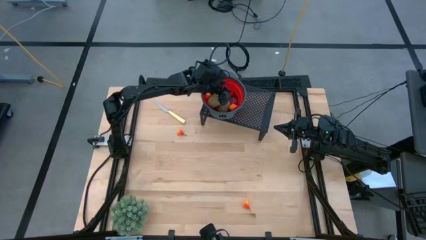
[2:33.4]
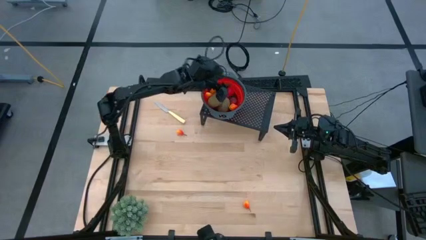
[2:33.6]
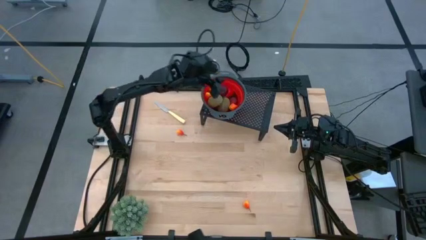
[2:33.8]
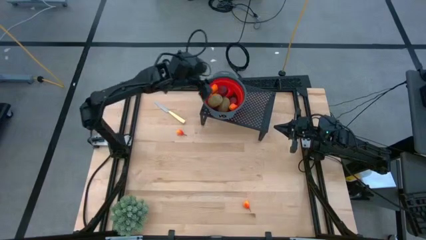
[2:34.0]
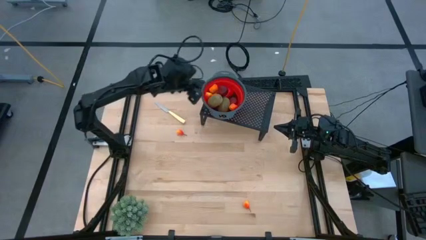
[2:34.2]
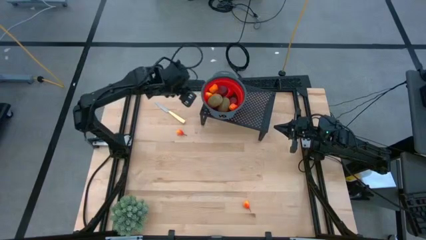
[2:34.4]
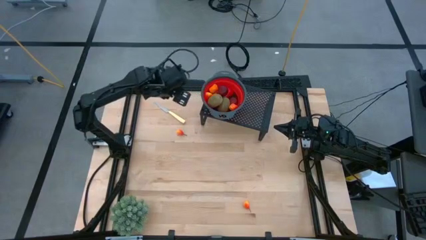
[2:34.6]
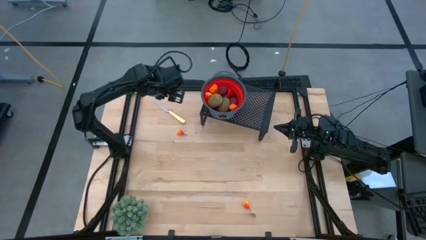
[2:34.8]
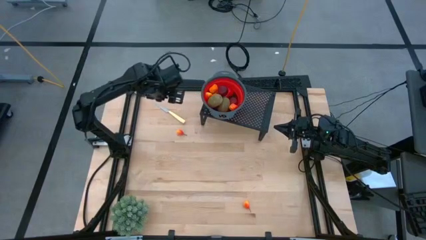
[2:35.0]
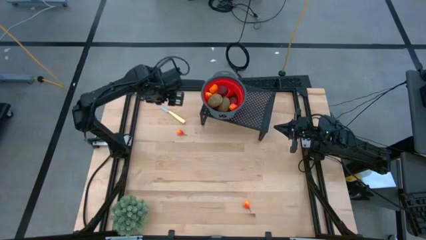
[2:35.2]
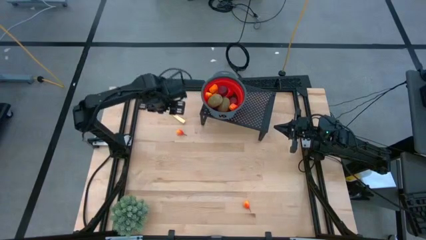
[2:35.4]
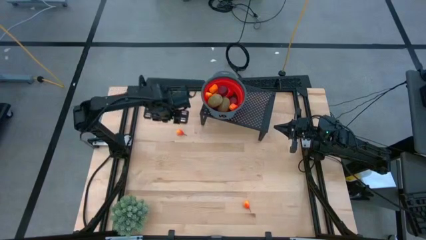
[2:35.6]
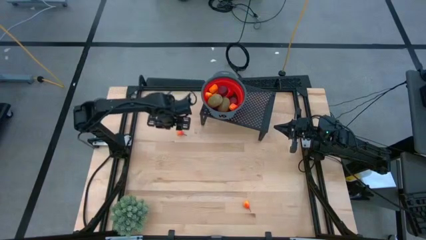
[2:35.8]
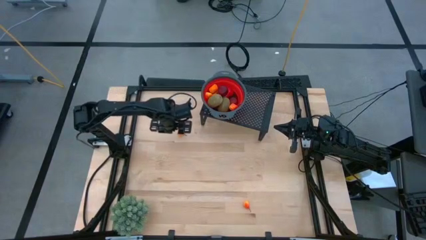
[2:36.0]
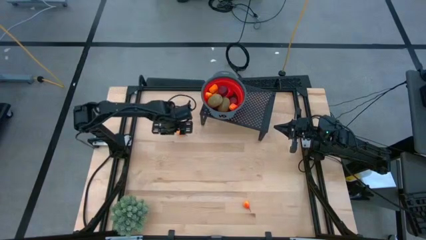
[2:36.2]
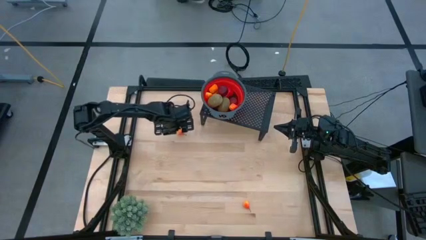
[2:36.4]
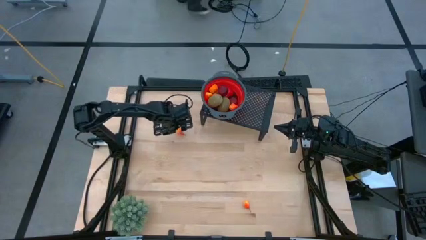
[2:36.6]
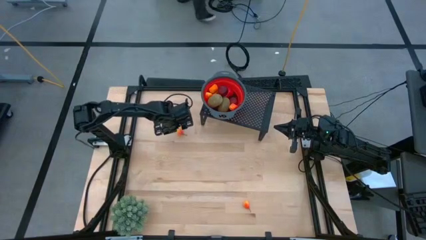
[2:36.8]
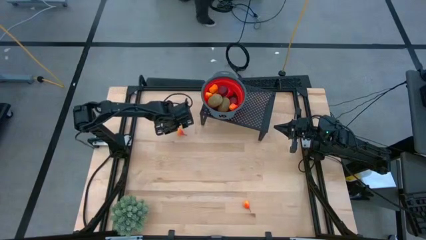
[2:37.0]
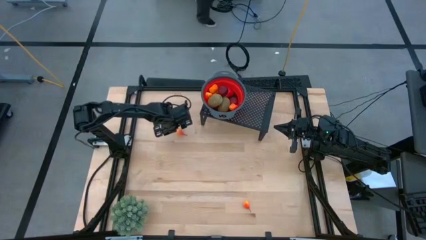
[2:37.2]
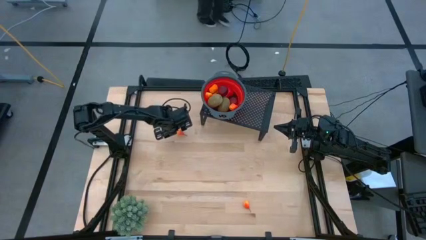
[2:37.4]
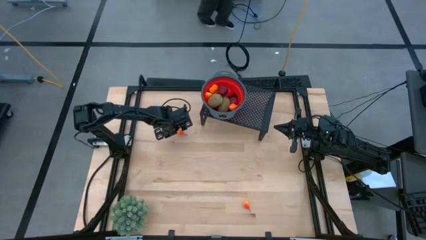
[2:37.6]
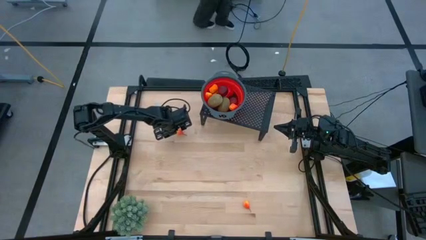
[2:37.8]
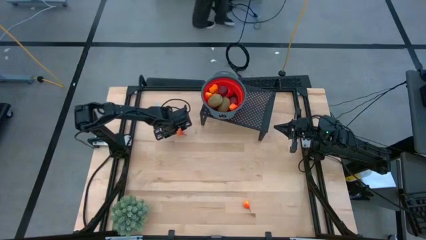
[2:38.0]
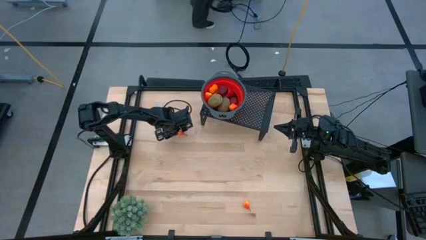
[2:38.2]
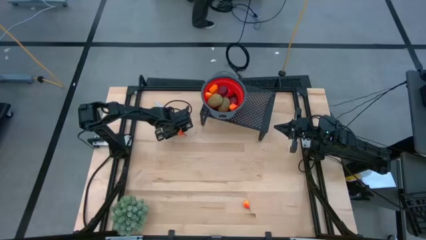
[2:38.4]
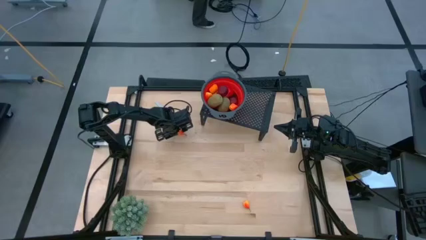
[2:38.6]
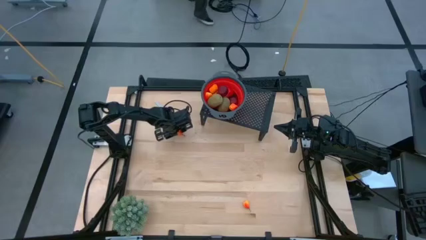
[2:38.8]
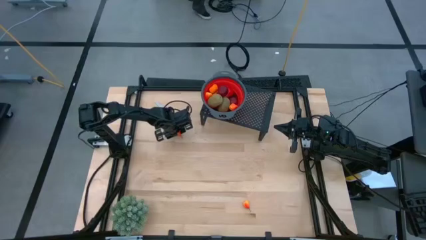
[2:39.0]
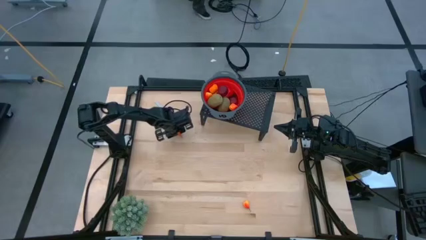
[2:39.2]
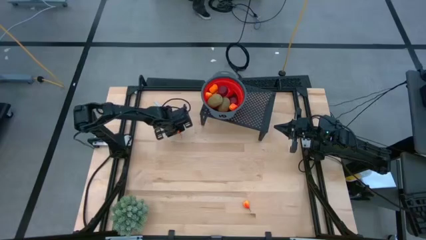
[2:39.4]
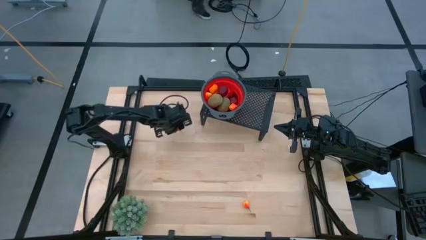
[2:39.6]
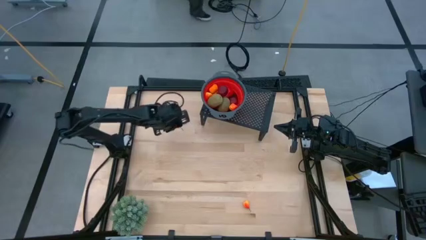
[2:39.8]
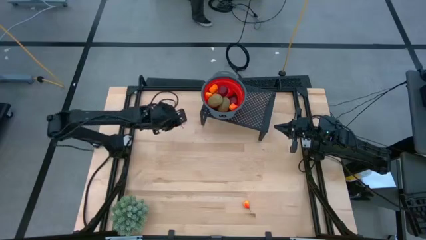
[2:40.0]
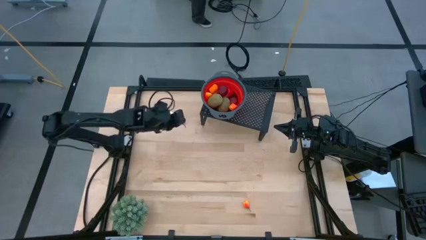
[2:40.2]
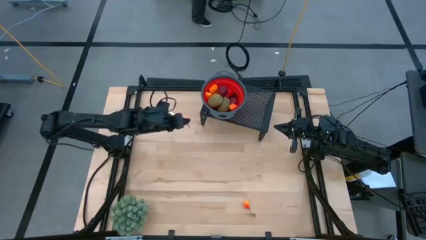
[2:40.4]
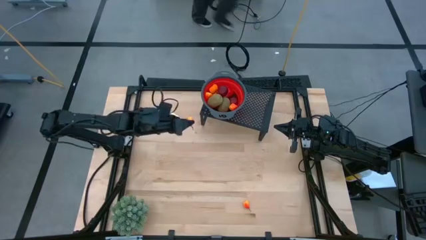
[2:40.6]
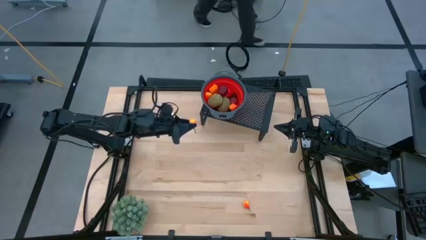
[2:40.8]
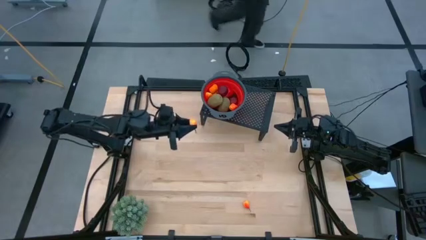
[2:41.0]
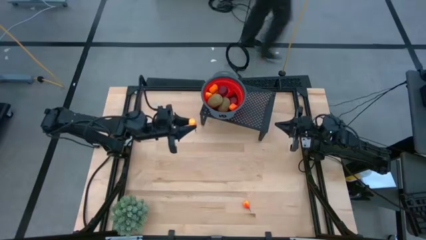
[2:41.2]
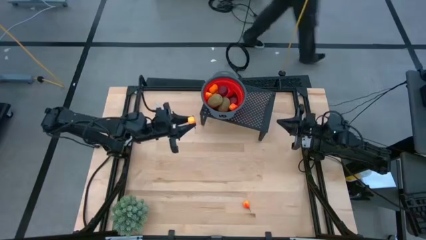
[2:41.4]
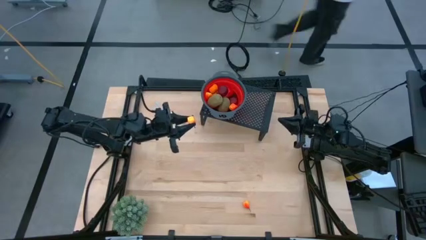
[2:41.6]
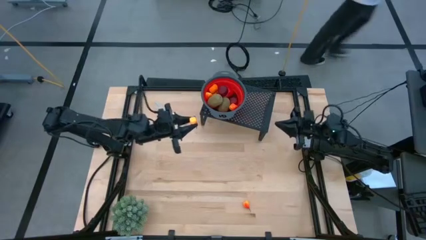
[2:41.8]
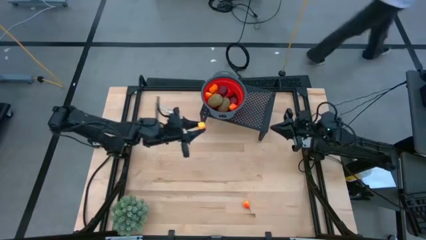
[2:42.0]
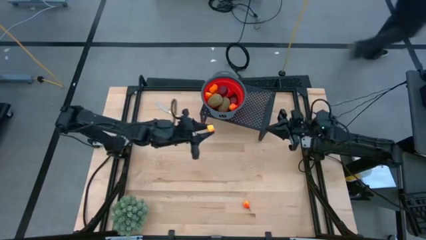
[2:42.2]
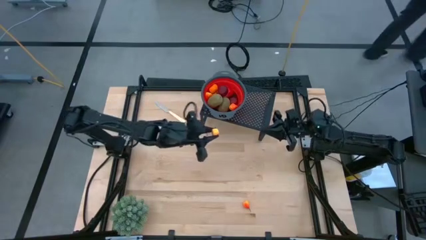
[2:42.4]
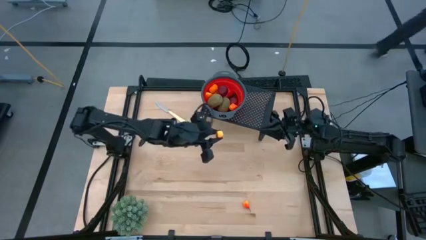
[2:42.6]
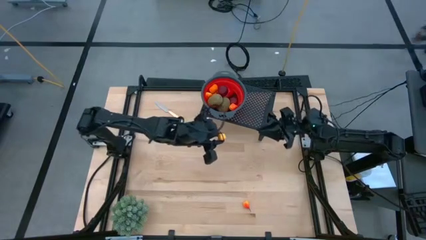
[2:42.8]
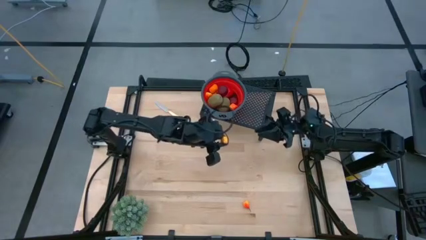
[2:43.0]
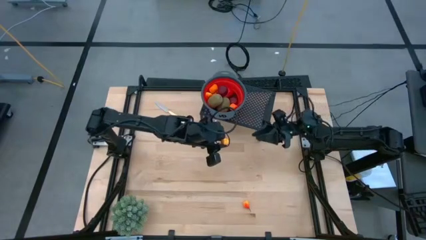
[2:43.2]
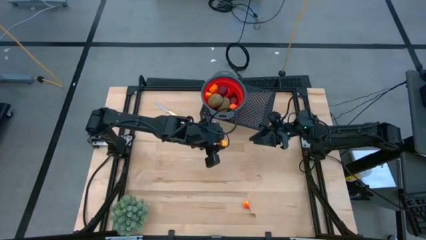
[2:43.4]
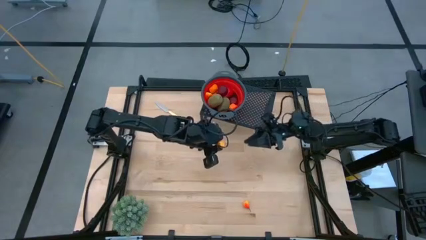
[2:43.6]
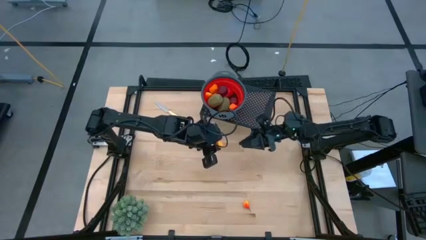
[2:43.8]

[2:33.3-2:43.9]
Task: Pick & Place Fruit
Put the top pear into the strainer bowl on the shelf
